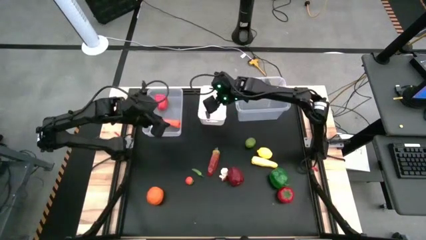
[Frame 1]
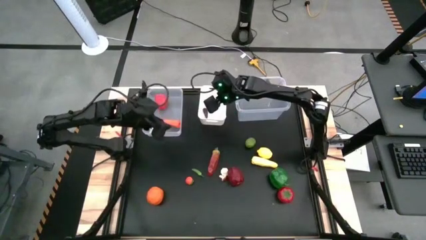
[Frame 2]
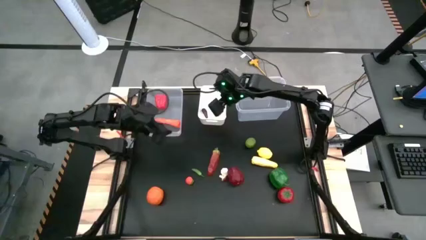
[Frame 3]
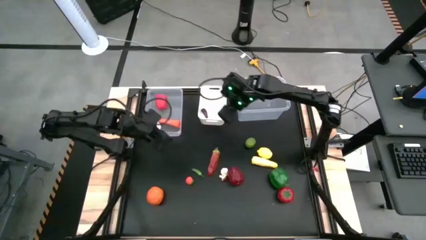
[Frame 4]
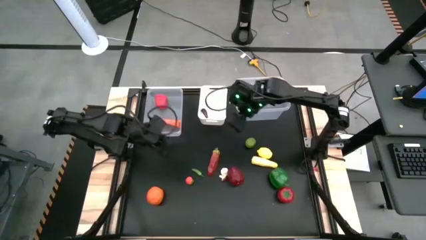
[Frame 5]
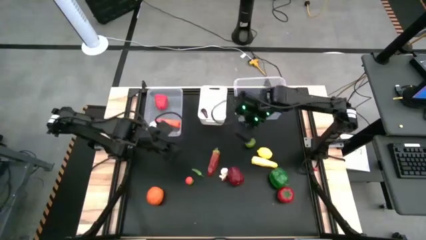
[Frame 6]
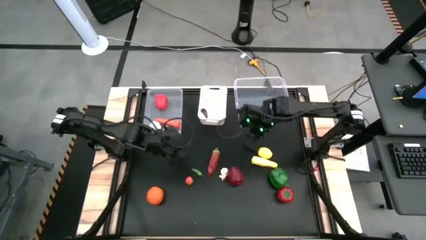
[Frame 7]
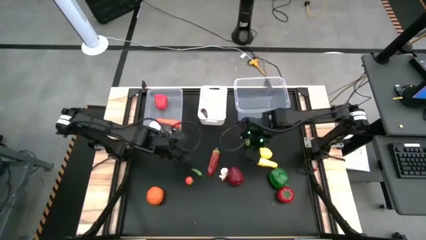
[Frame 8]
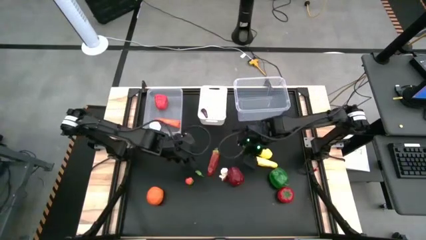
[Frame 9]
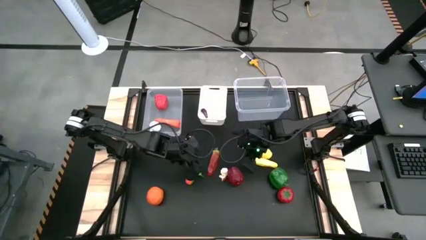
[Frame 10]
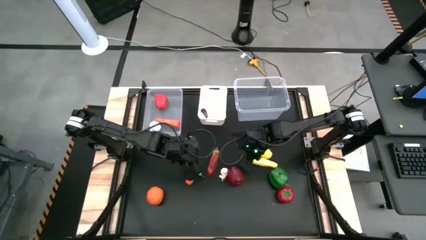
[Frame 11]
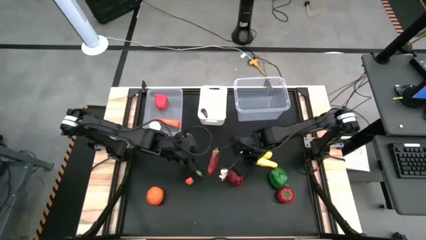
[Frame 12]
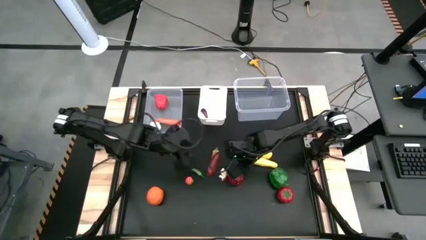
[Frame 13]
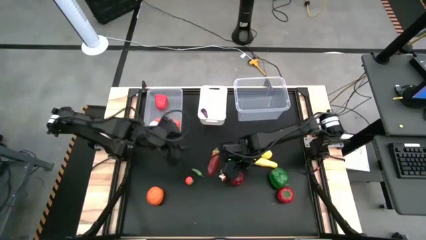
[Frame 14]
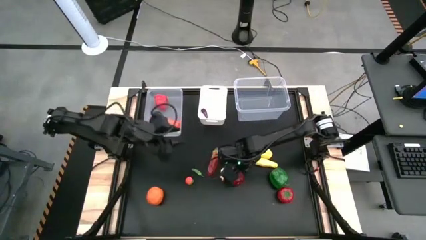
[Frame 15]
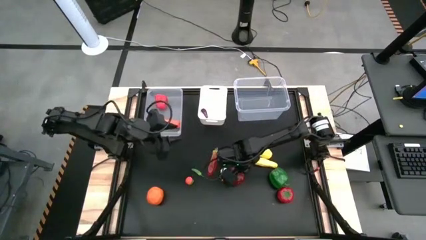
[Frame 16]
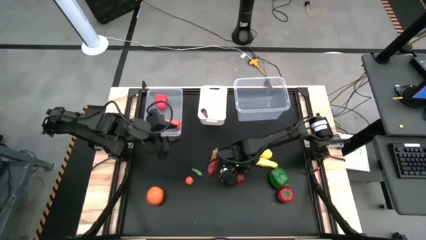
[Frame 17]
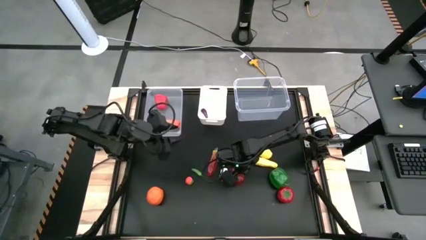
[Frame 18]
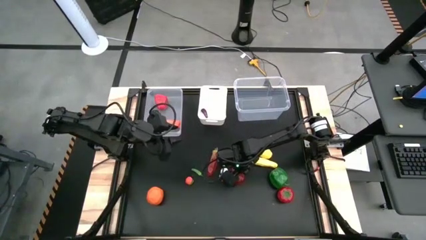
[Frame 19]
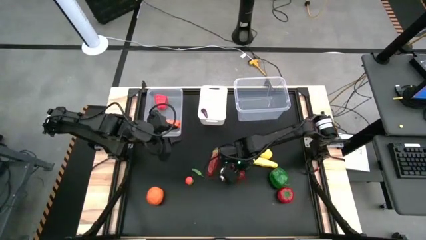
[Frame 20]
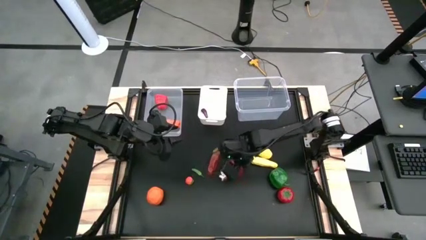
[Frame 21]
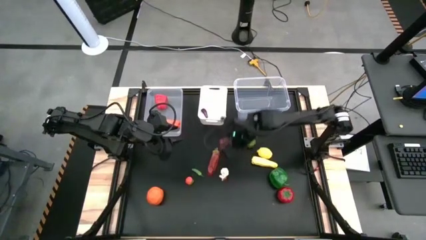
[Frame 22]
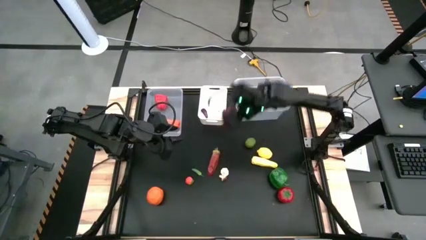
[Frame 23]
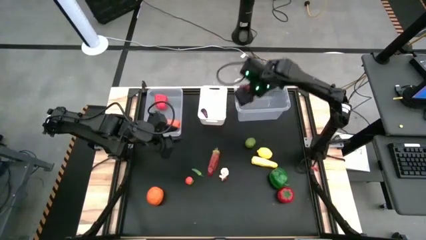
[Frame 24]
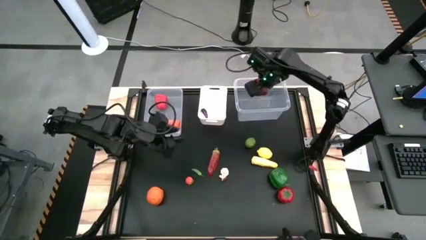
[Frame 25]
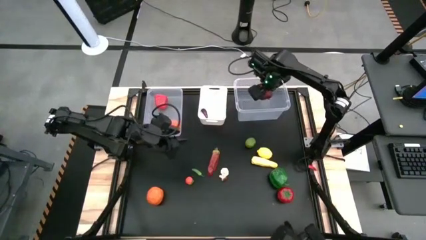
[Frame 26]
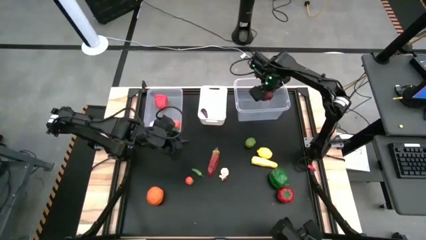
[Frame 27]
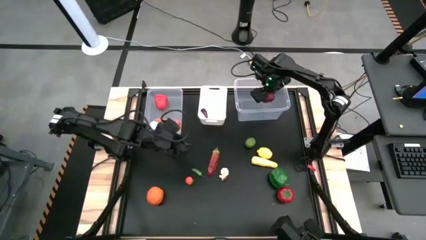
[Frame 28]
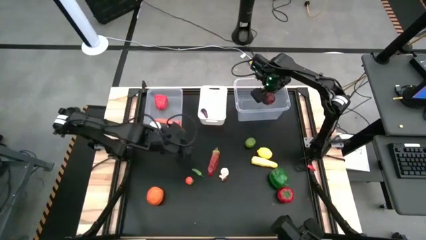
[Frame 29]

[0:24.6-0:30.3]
Task: Sort produce into baskets
Put the red apple into the right transparent bin

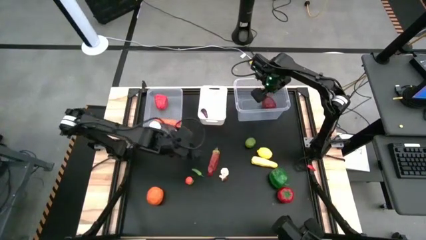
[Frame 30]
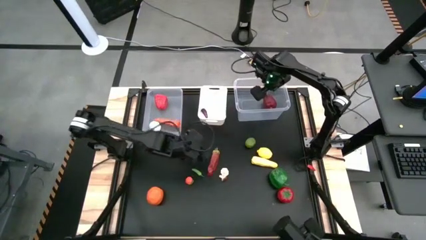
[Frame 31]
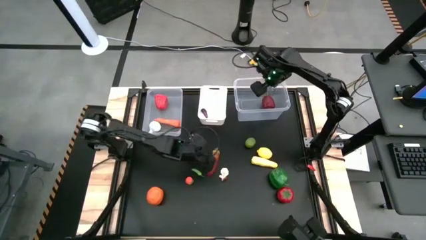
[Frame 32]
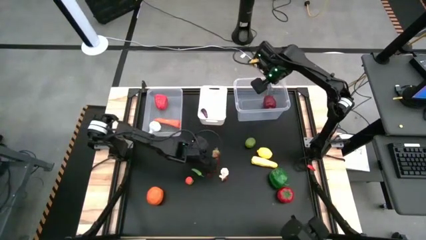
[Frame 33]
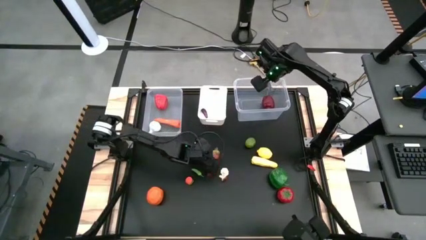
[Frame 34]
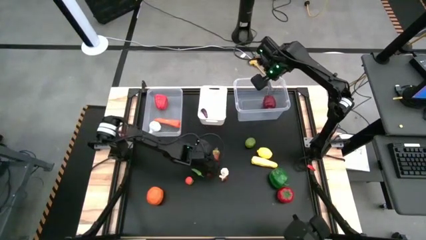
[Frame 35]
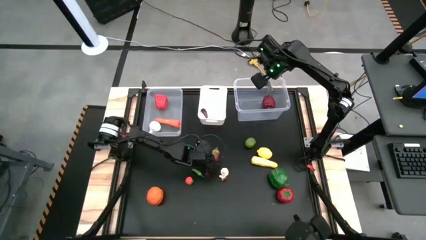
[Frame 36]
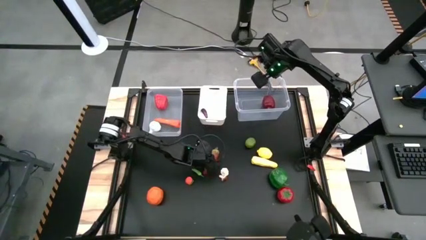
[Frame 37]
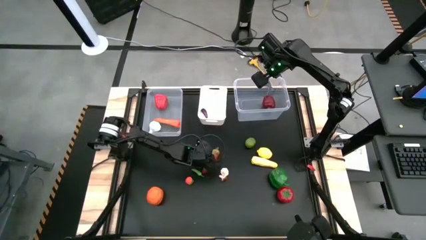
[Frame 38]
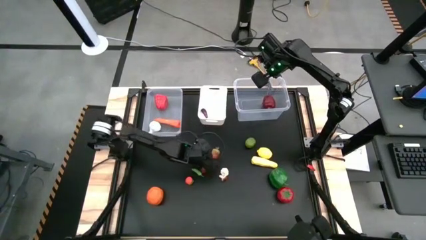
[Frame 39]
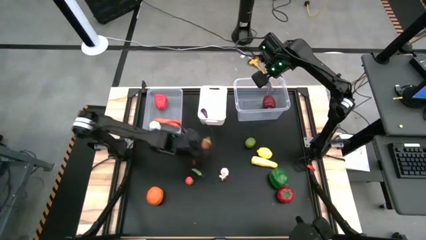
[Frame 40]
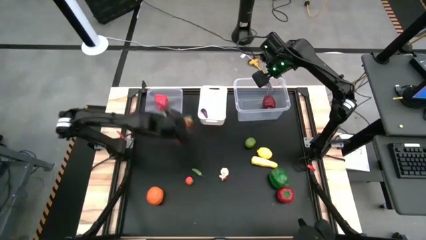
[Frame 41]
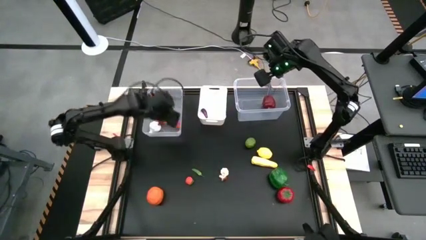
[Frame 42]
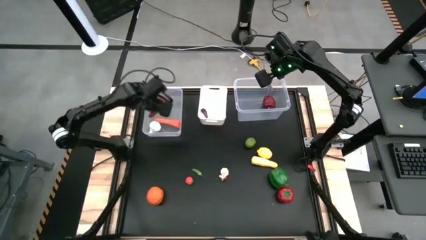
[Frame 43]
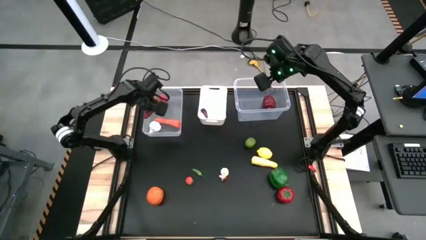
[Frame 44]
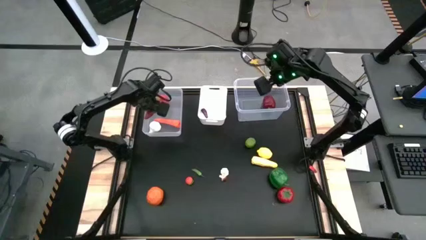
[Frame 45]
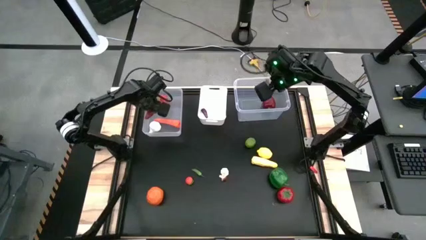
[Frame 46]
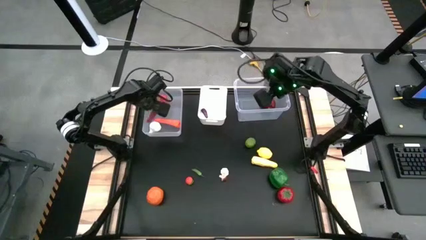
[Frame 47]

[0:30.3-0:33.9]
Put the orange chili pepper into the left transparent bin

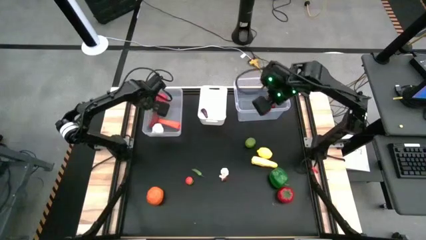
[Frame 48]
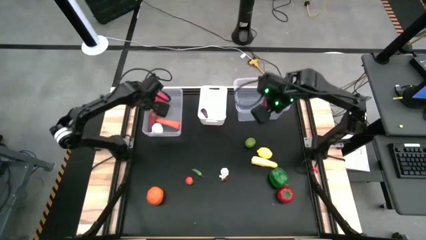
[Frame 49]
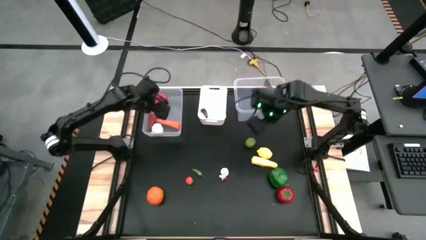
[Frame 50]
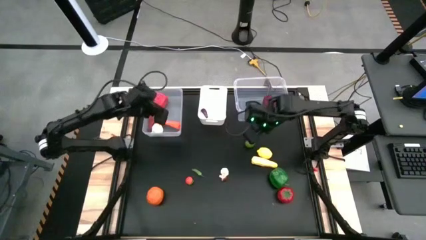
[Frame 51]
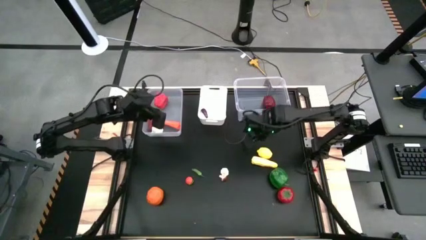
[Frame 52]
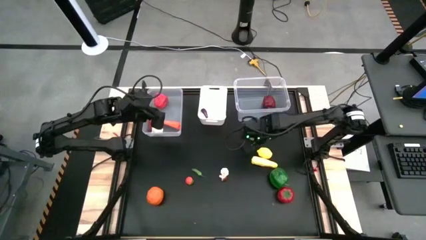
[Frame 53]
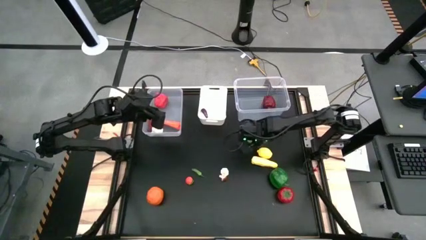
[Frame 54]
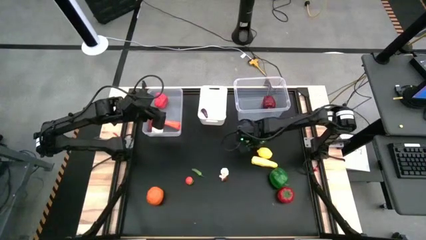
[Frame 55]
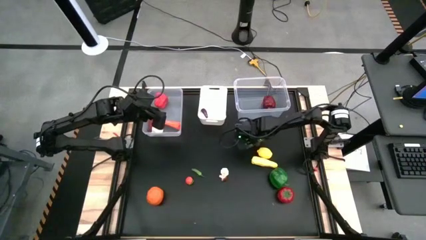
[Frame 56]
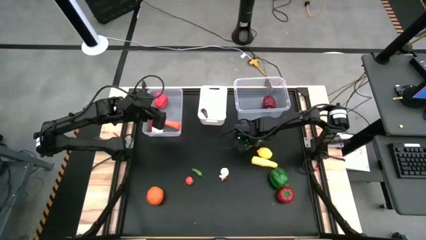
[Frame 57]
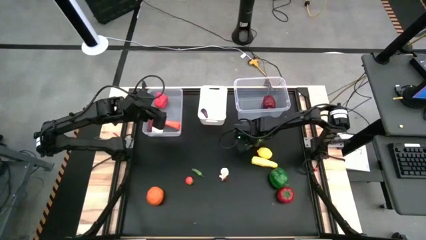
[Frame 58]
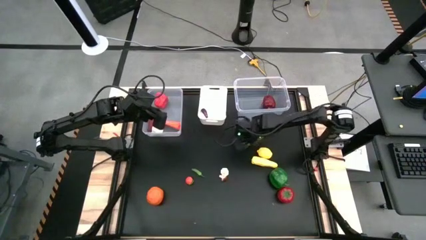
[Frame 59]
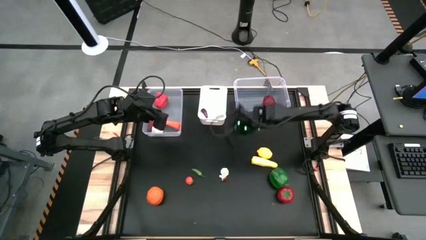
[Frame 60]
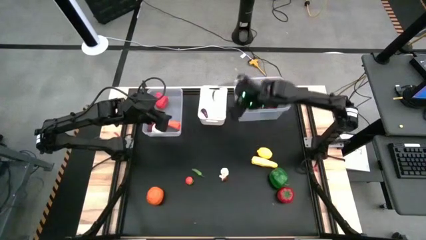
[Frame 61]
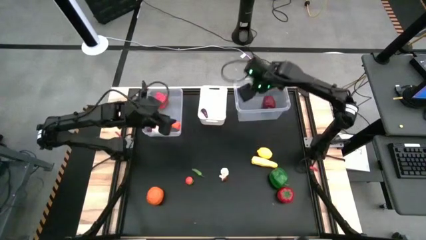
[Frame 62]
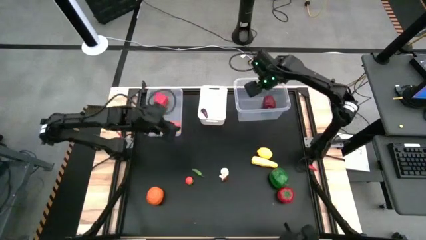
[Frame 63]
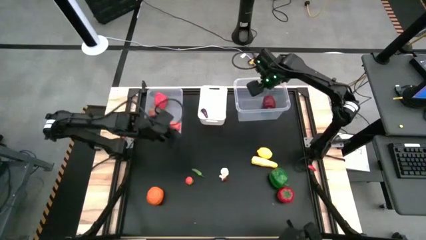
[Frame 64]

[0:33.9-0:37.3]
Put the green lime into the right transparent bin

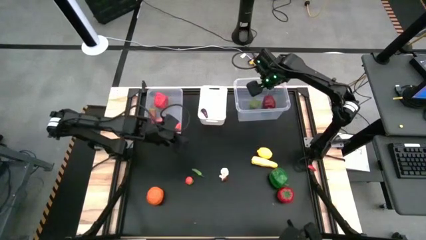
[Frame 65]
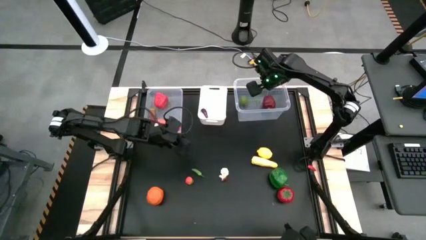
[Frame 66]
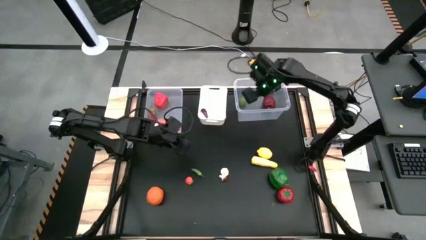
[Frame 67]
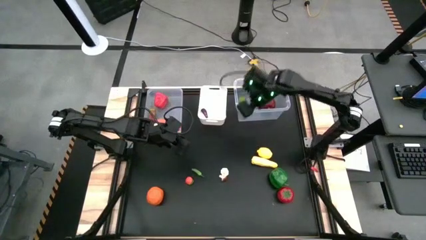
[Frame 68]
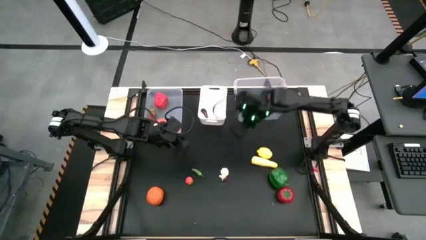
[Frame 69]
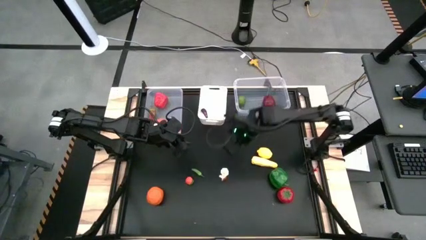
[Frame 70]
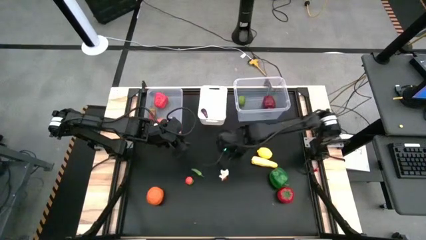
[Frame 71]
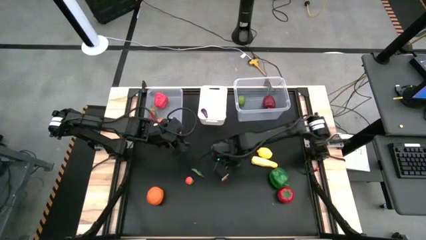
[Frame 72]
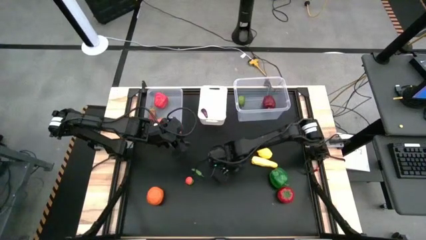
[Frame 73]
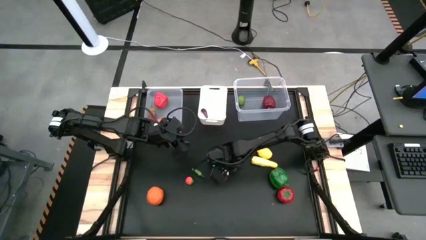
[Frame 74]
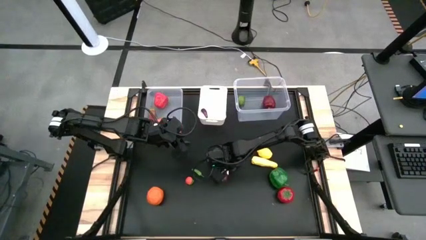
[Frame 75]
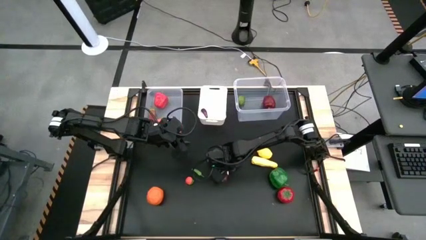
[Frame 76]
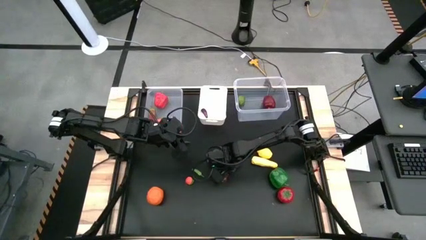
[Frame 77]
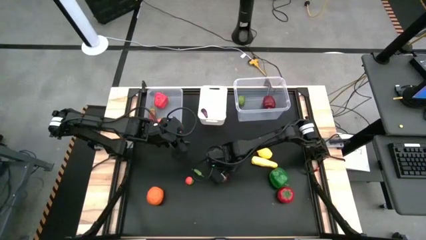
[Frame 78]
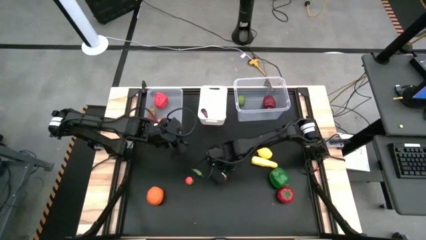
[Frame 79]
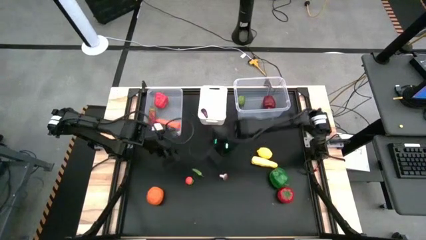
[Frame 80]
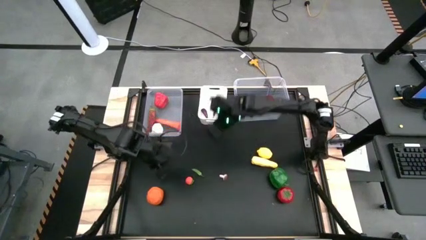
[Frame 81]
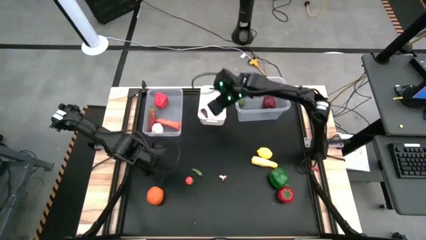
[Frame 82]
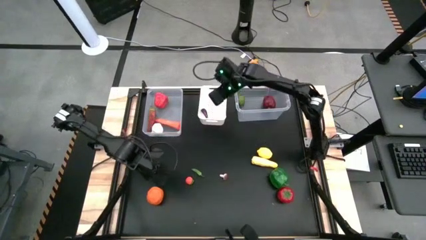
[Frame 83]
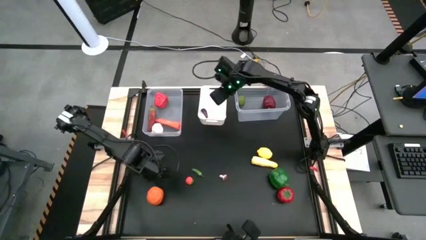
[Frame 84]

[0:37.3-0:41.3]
Put the white garlic into the white bin
